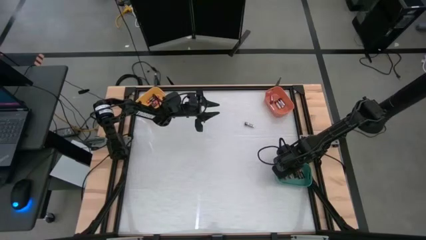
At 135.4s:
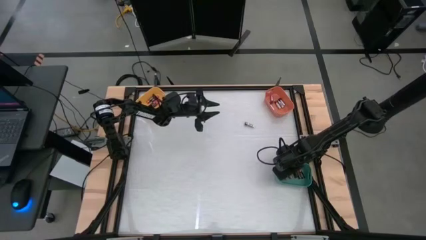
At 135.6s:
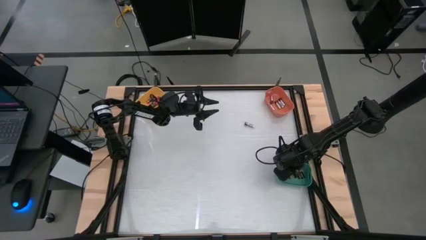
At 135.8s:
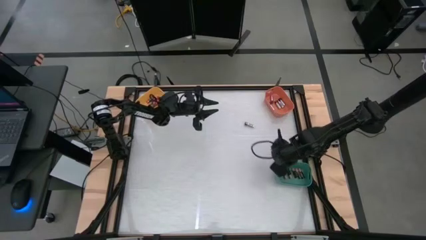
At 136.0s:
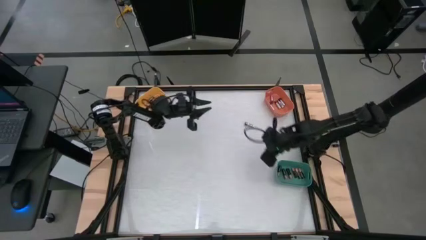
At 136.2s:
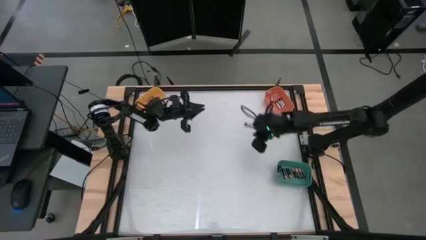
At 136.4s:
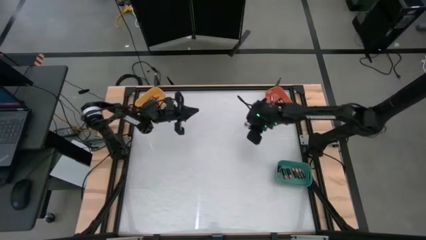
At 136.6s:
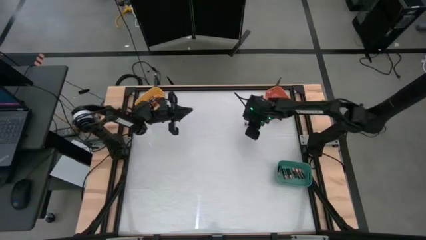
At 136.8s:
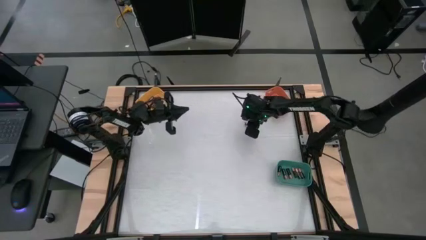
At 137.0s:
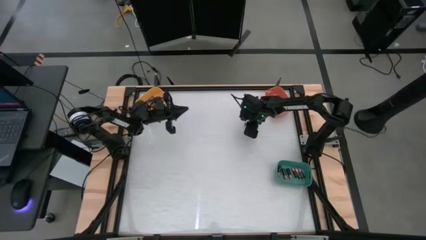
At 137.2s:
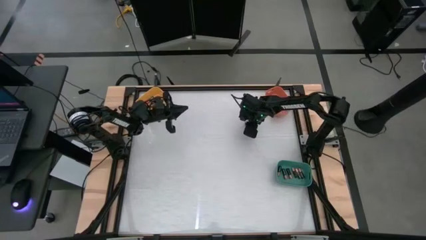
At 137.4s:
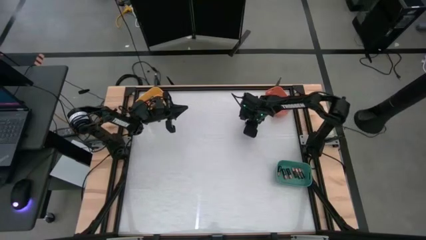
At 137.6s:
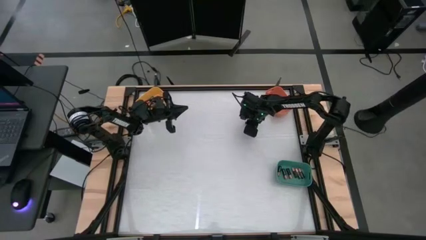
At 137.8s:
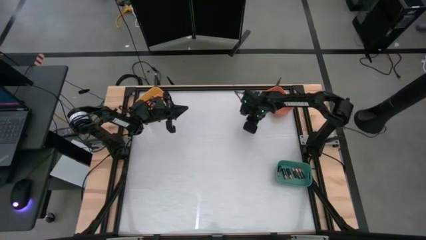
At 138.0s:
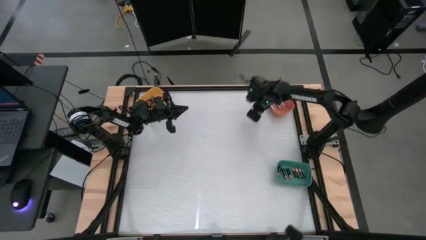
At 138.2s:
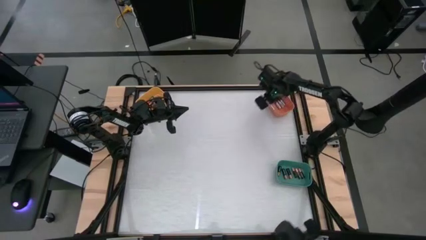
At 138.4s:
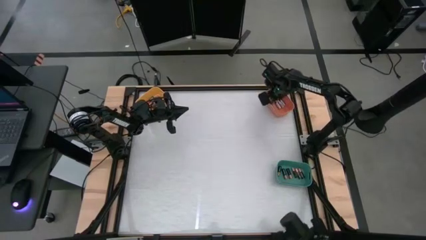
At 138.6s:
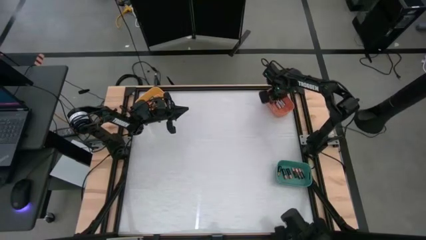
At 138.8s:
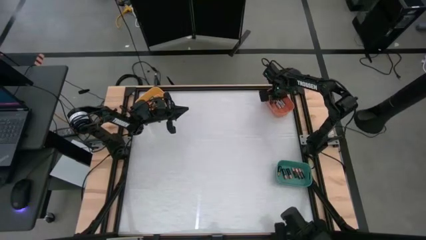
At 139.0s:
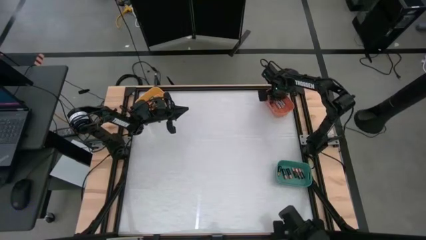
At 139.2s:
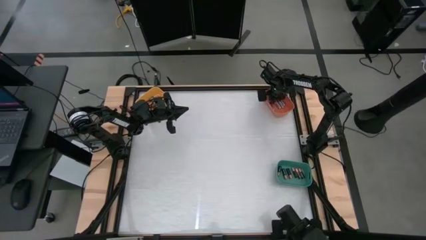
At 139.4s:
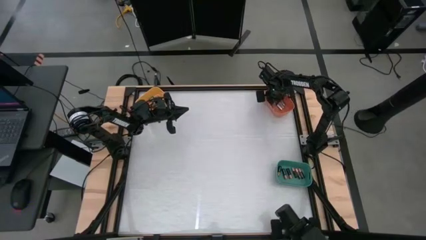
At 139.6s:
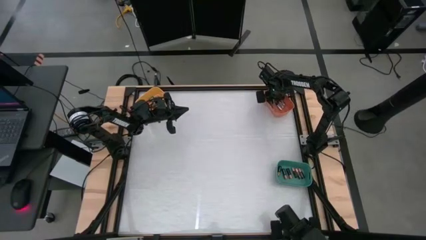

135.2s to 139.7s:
Task: Sort batteries
Put the silver battery into the orange bin

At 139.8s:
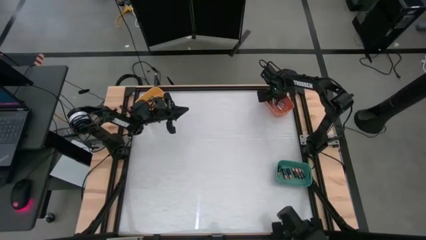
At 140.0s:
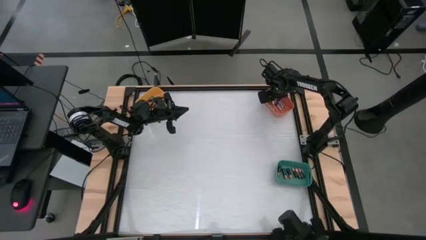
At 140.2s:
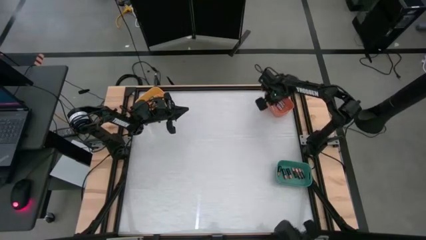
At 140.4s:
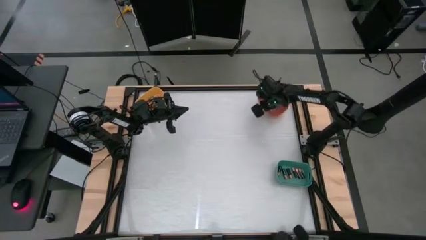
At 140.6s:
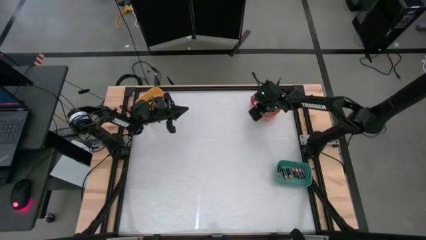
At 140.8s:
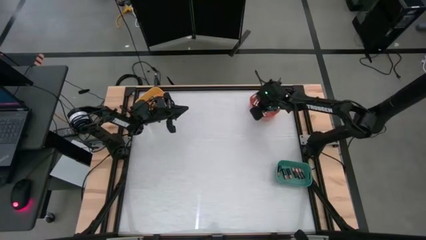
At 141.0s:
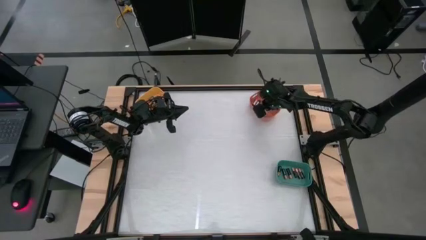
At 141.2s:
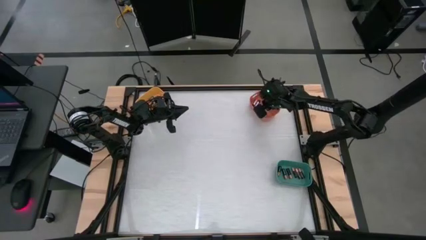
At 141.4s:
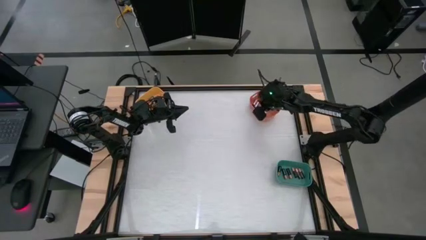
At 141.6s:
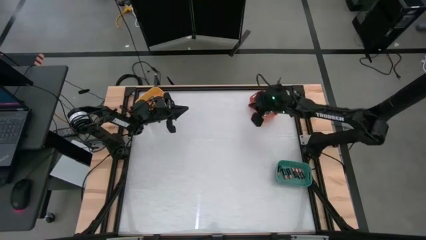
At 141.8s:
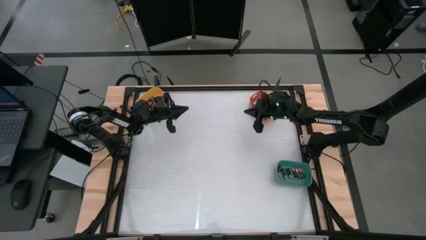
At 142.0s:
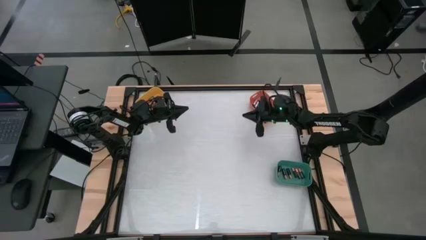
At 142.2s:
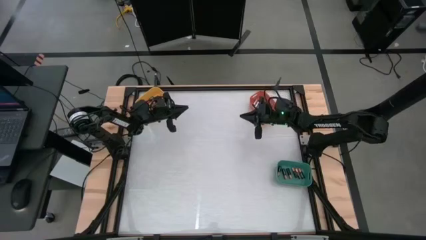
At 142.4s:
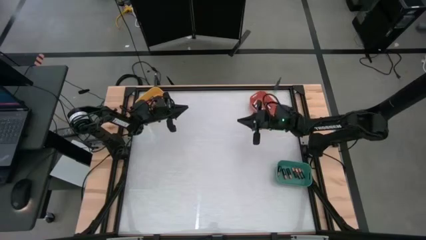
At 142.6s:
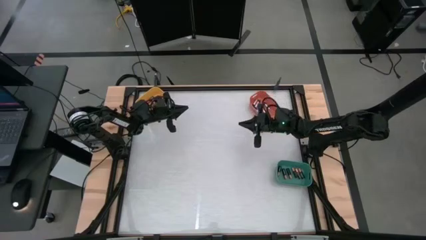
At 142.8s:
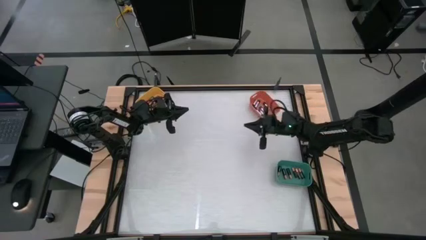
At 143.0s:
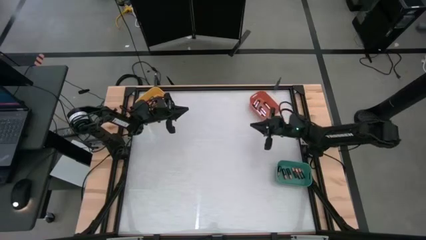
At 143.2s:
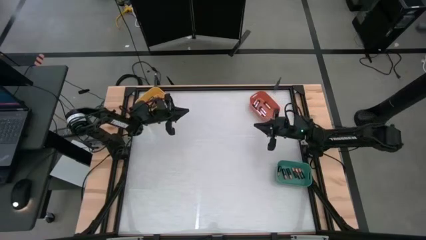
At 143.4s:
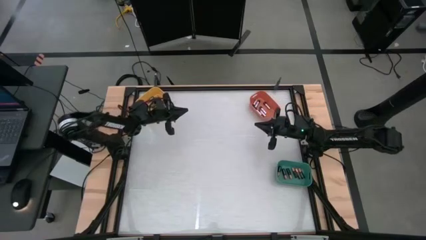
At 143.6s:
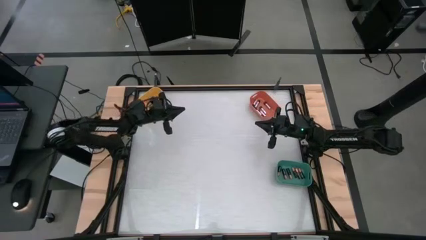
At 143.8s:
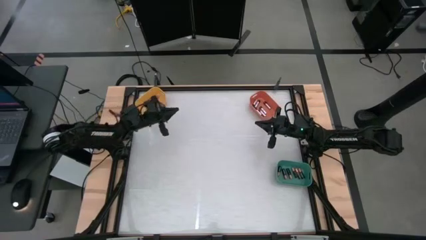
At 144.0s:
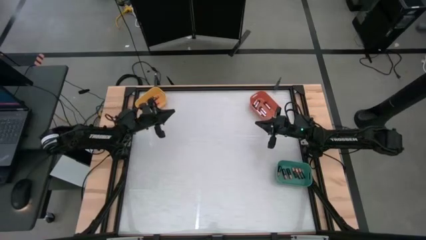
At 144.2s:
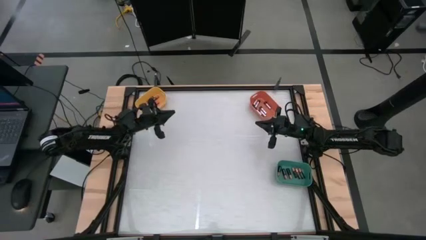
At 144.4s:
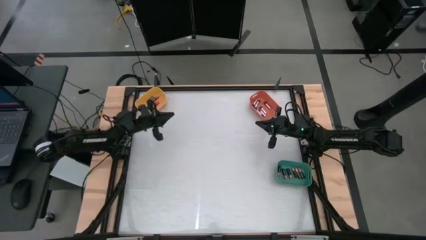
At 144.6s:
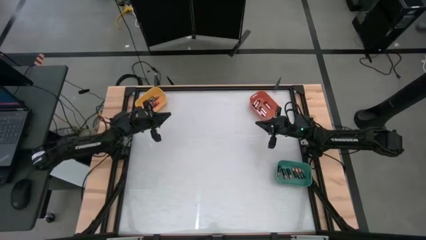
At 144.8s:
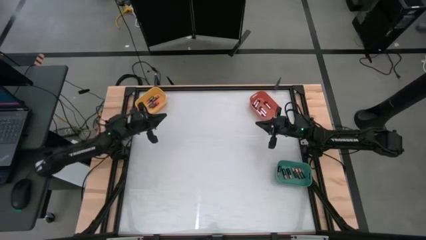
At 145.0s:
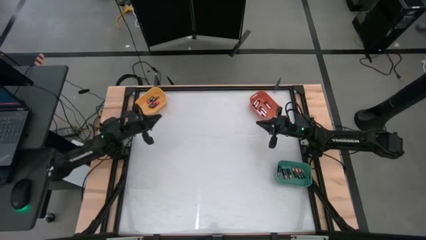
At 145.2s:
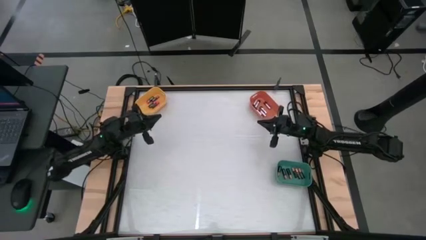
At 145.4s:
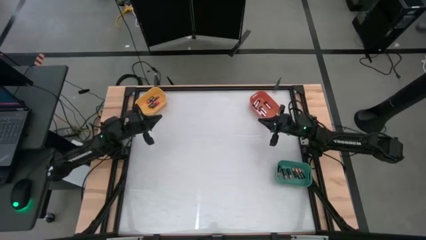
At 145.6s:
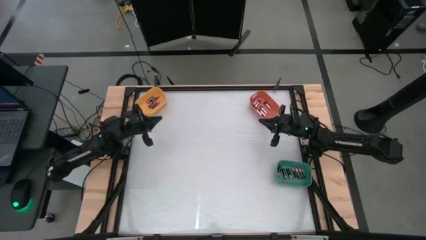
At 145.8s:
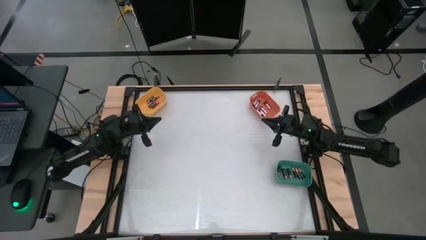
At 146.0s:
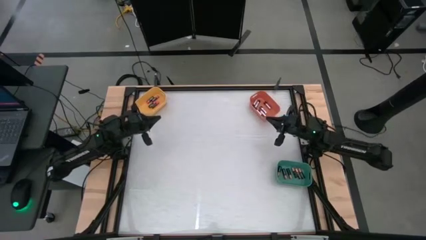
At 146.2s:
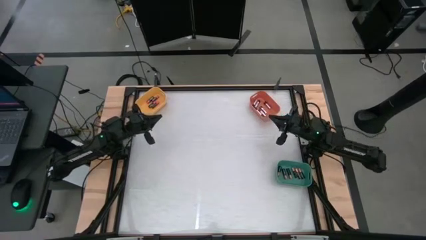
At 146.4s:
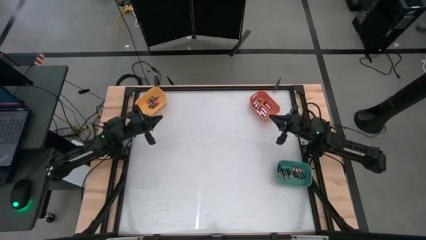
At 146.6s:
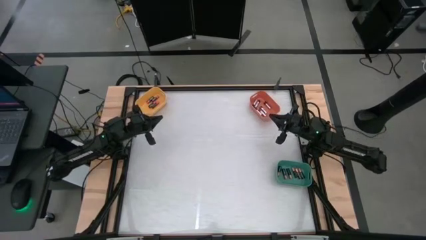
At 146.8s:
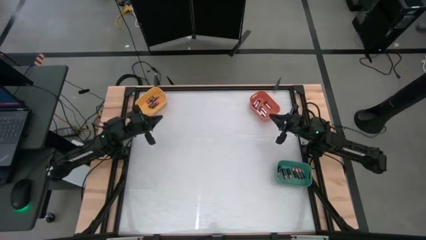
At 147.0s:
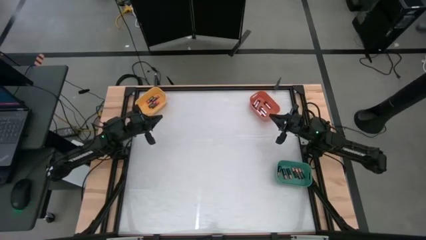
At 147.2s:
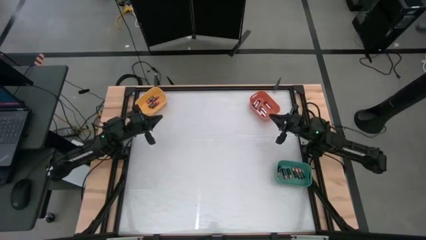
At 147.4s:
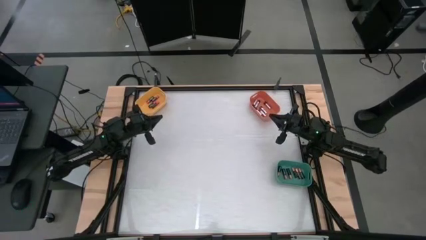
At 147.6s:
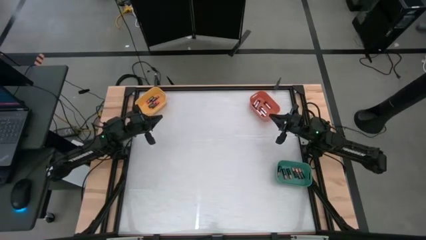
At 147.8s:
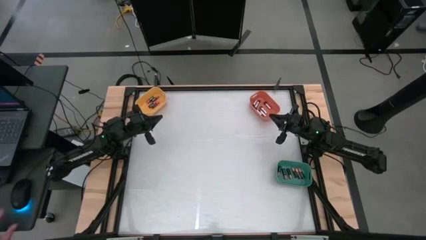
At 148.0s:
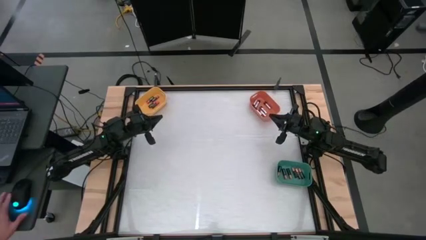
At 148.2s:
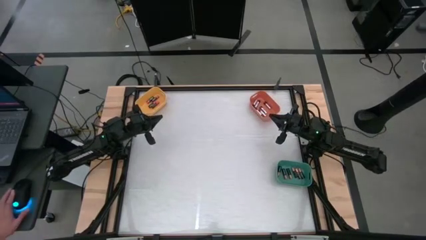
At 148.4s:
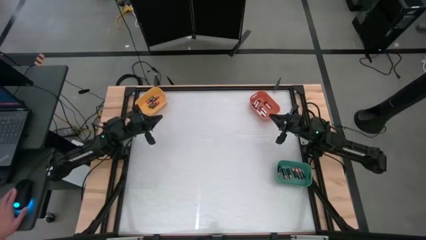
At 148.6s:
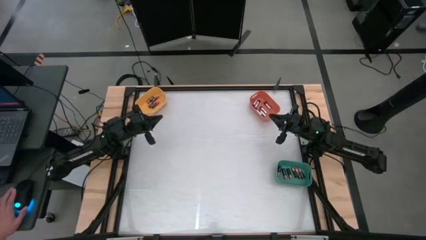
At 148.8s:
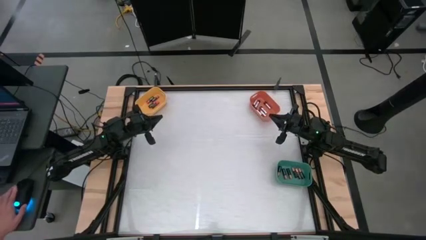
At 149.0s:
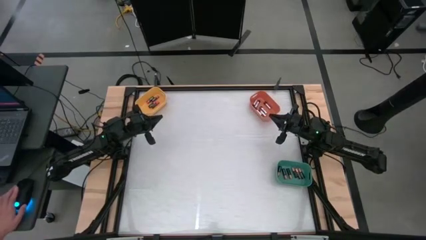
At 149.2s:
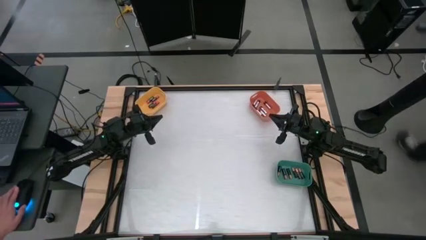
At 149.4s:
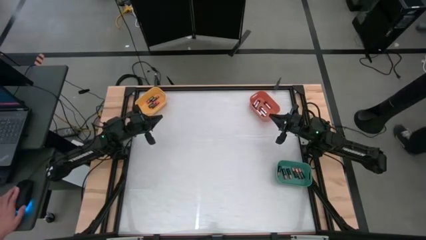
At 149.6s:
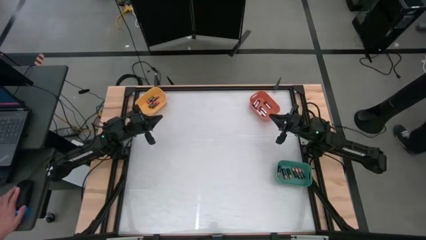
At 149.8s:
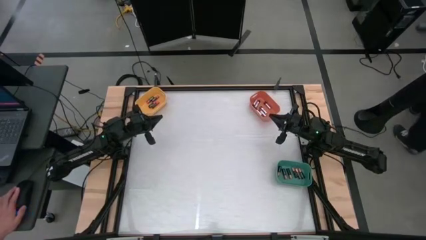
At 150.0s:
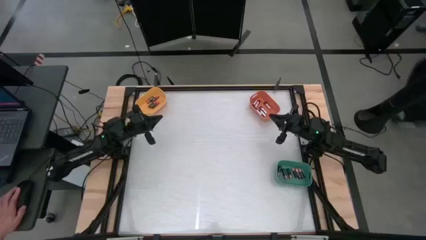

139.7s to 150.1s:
Return to Home Position

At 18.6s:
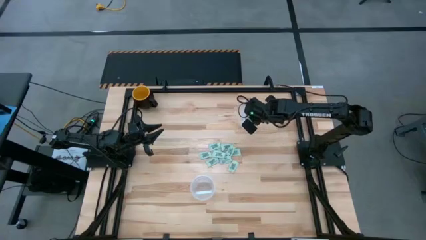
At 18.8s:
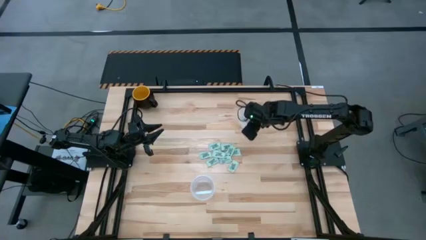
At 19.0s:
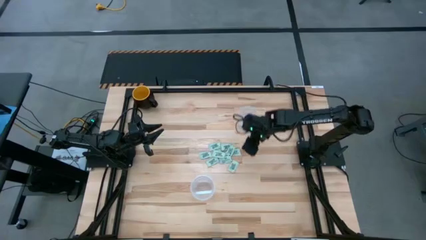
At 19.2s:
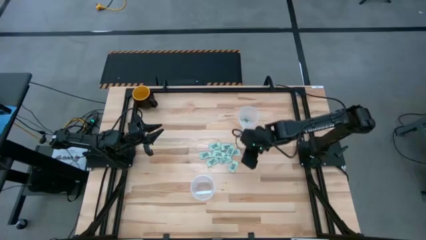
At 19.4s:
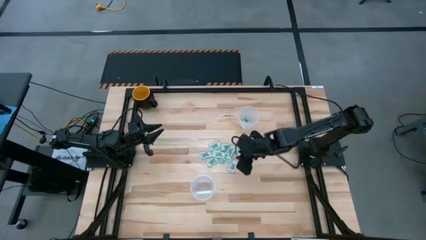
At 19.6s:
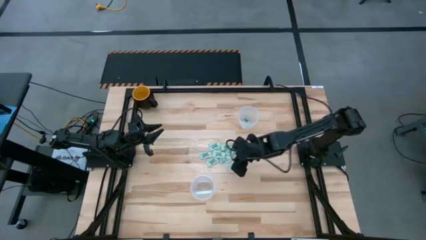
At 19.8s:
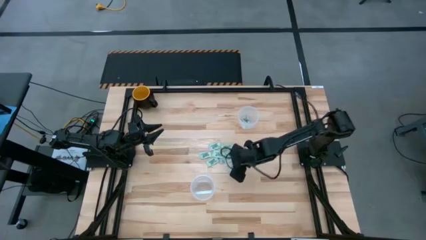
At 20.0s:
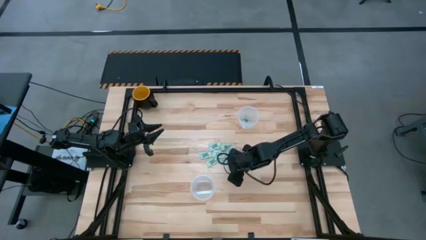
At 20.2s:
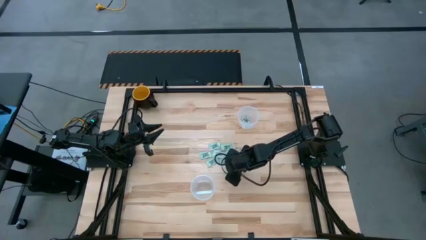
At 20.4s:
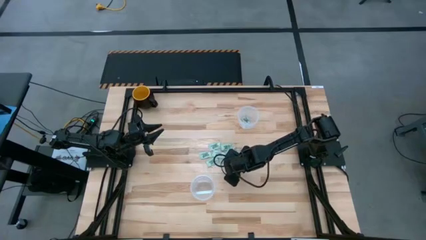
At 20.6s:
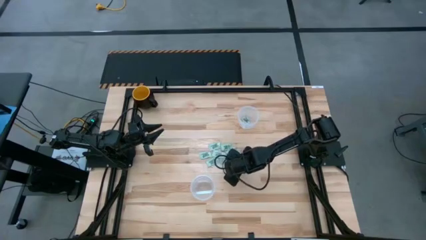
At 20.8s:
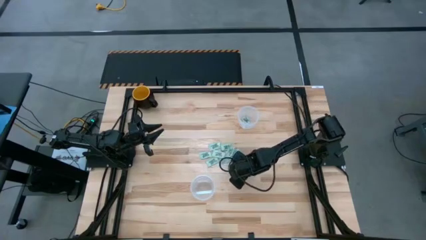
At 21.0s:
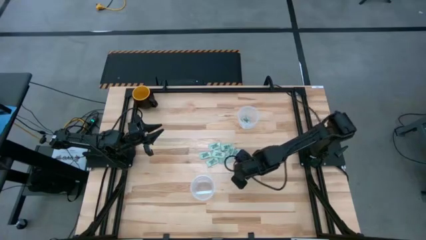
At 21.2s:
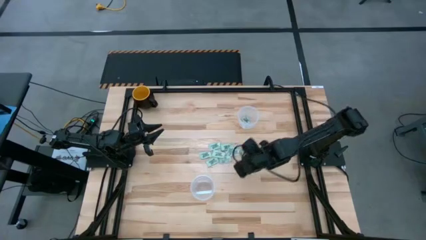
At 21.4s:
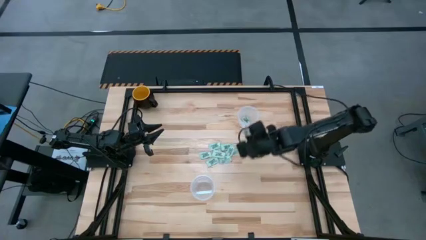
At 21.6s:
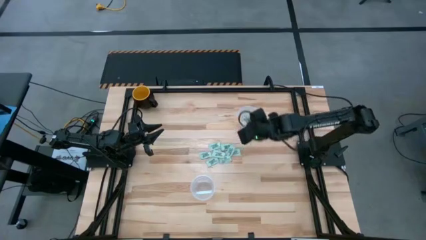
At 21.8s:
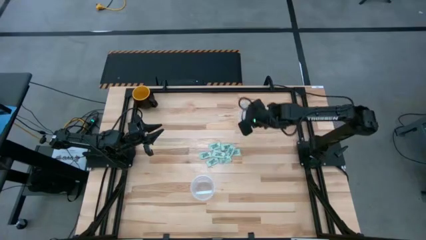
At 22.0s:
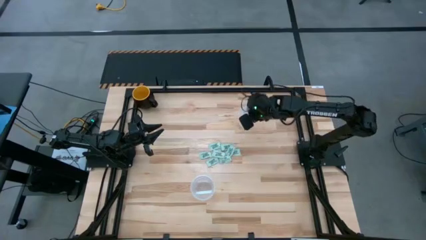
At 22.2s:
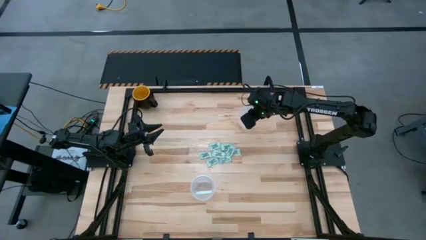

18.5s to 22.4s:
Task: Pick and place Stevia / Truvia into bins
Put the stevia packet into the top transparent container
